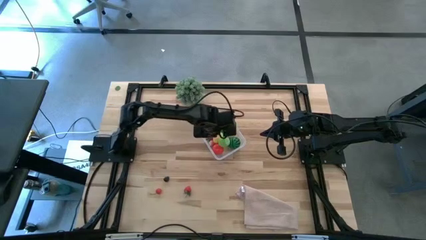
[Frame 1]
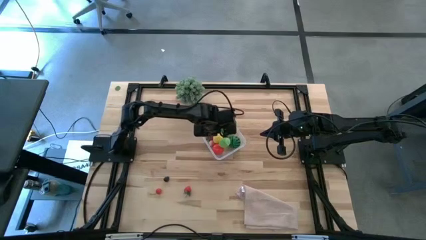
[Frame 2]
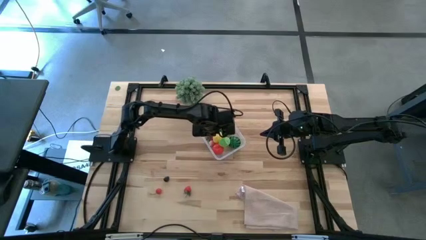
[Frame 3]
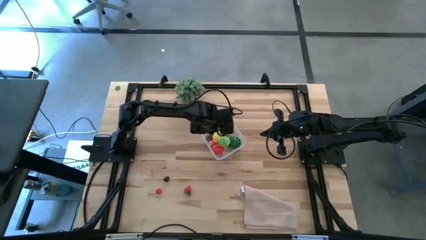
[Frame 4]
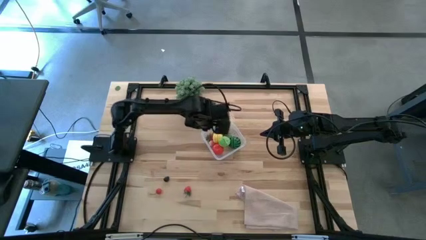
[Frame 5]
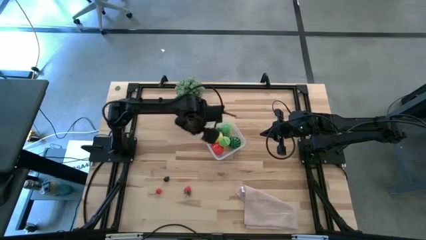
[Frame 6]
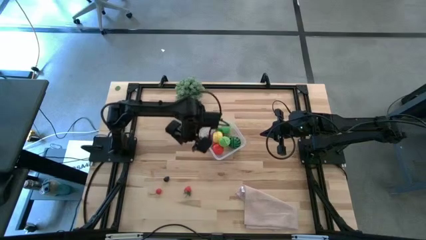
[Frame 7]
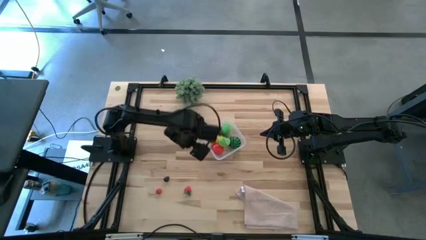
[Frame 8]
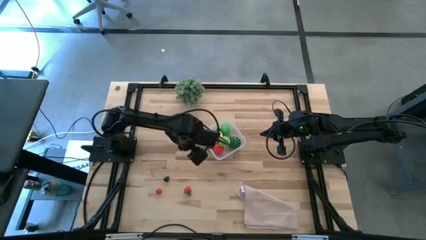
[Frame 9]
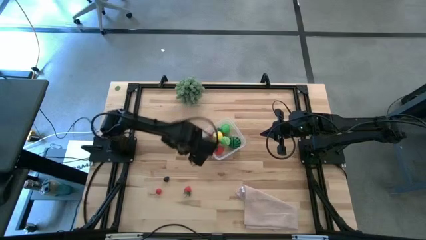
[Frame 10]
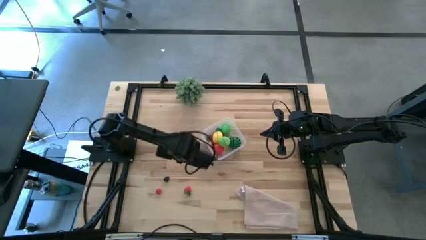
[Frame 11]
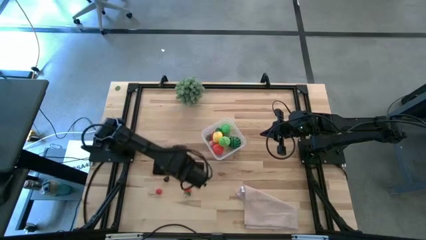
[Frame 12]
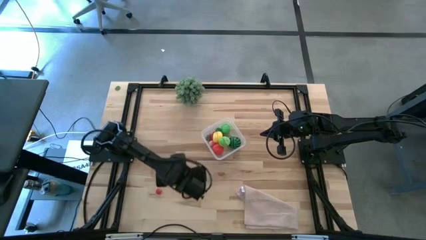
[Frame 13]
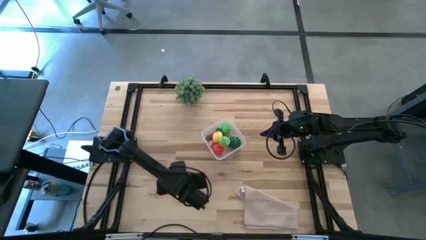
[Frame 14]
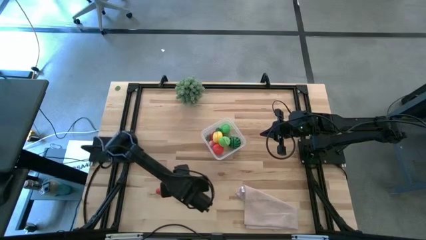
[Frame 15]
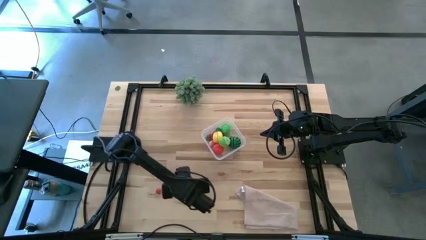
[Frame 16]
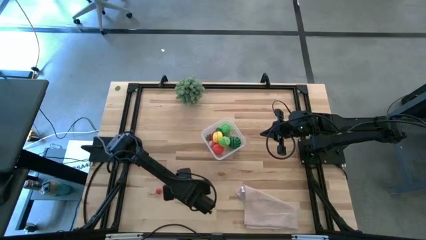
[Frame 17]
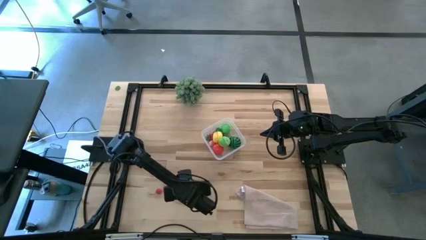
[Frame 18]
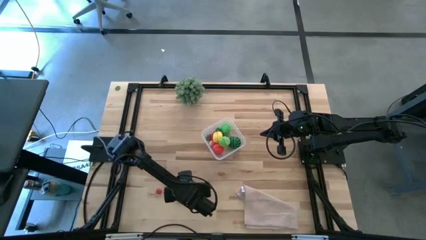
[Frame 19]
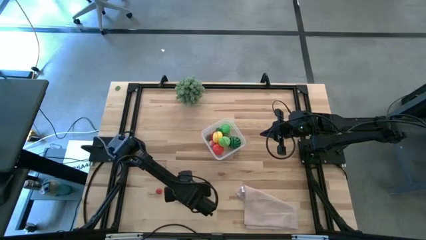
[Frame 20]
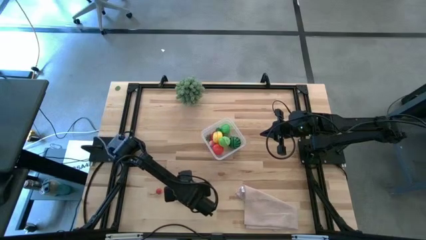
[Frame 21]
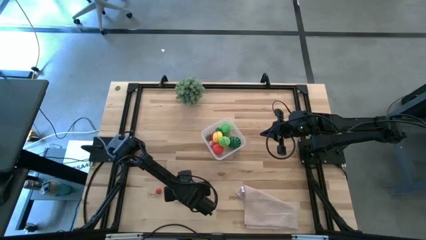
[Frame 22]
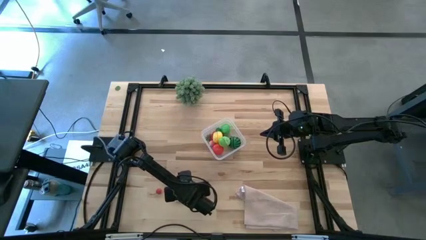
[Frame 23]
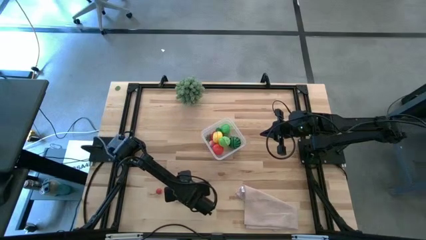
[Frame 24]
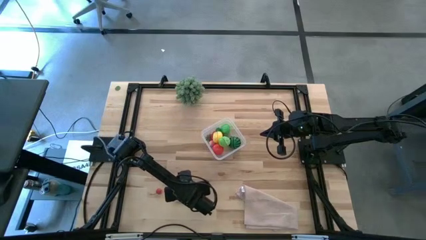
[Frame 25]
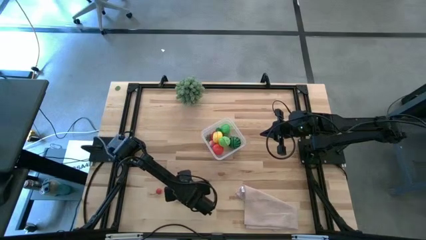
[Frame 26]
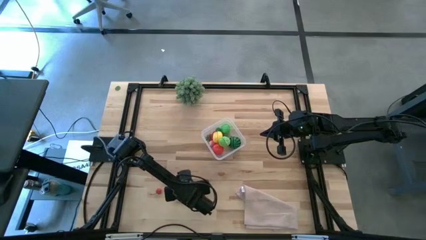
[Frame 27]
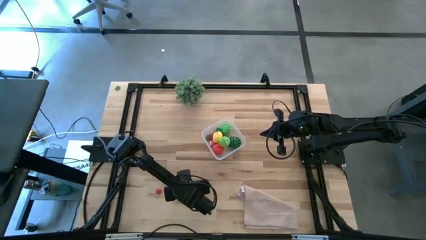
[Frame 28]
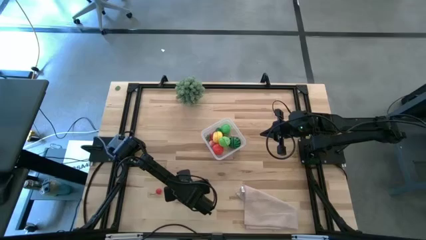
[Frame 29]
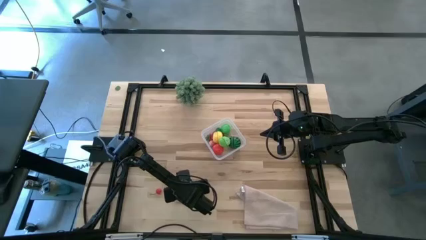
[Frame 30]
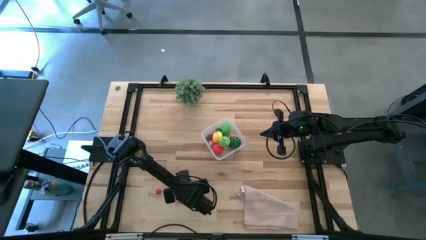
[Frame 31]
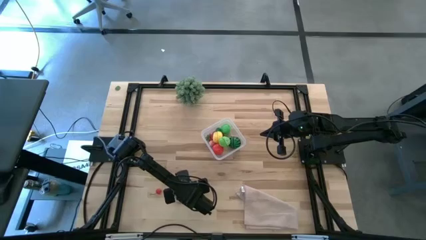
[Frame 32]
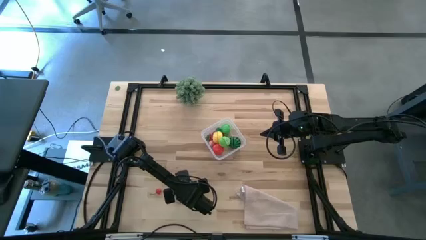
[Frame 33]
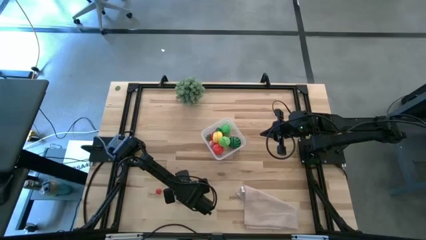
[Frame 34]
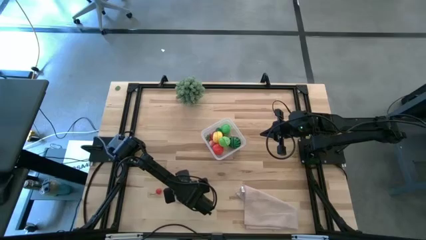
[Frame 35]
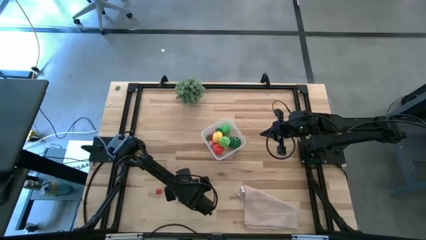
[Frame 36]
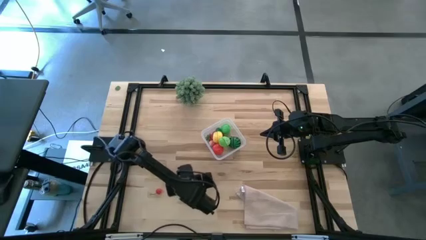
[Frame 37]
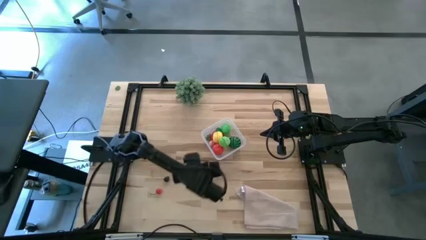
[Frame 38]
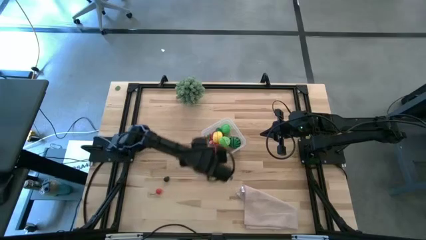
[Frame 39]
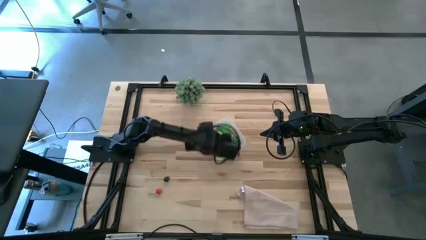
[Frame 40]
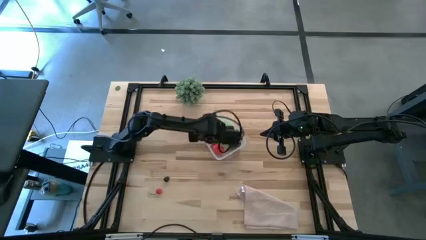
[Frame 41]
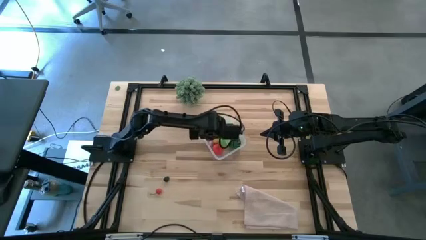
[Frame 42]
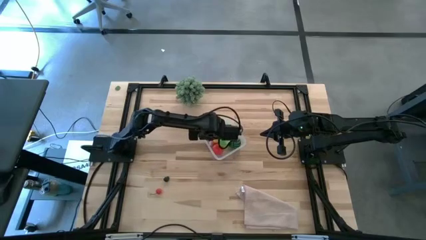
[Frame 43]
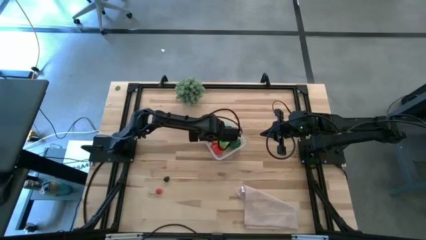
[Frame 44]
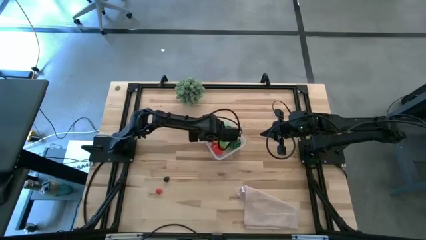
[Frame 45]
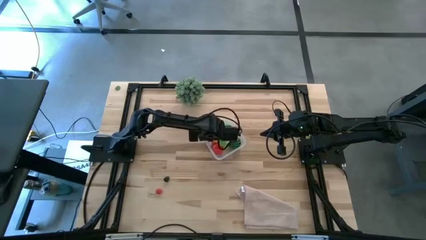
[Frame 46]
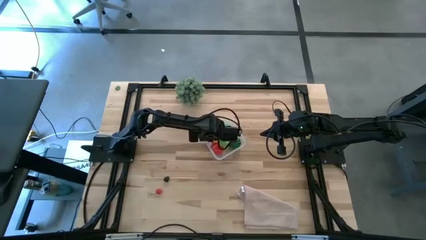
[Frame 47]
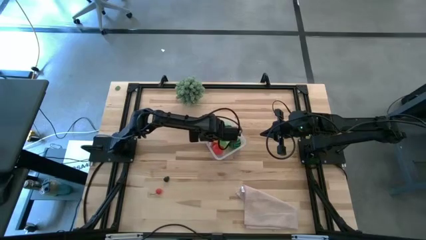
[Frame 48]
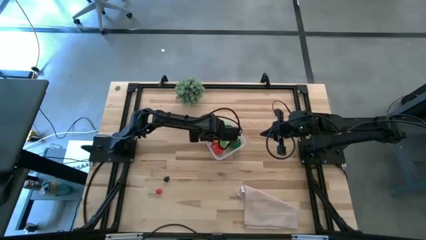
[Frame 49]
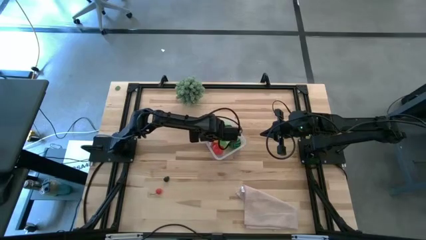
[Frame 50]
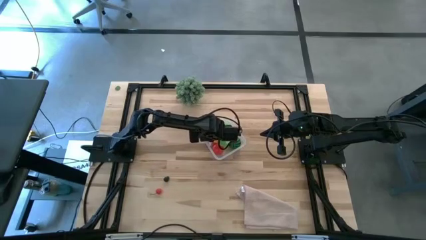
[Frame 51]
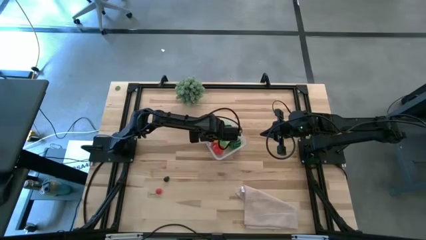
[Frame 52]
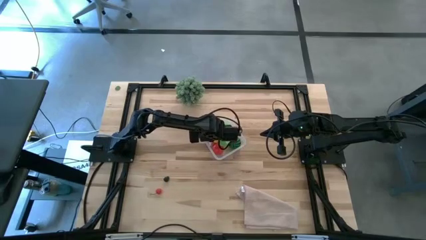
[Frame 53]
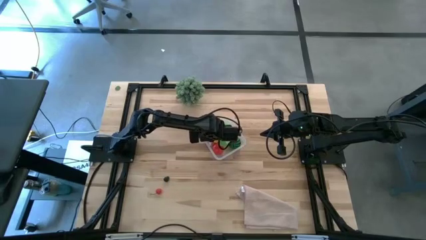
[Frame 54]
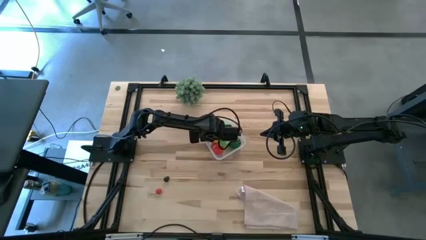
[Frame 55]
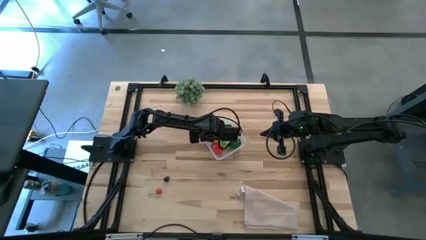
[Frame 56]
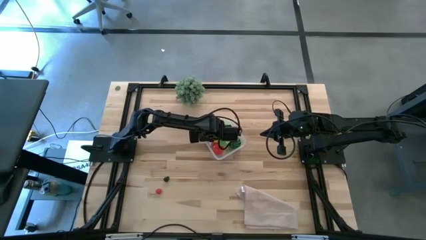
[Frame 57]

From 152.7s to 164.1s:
Task: Pick and placing Produce into tupperware
Put the red strawberry into the transparent bin

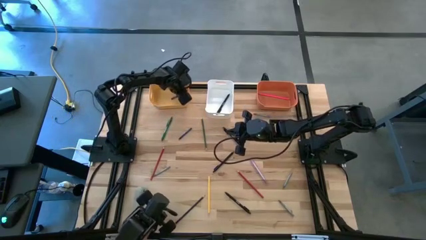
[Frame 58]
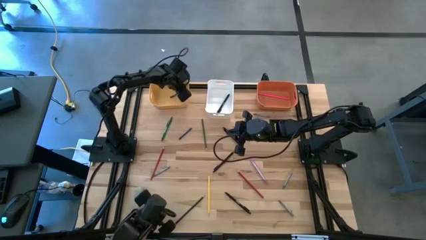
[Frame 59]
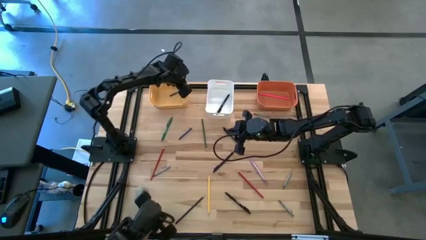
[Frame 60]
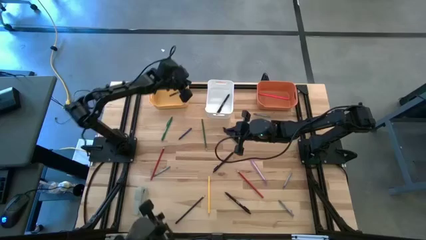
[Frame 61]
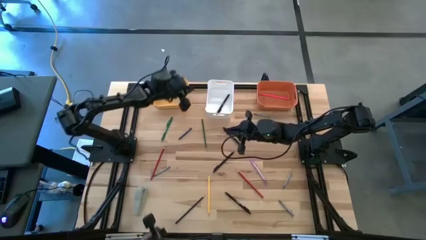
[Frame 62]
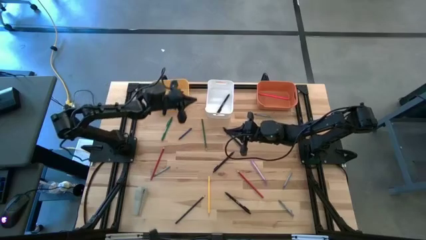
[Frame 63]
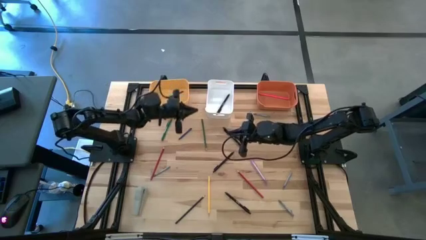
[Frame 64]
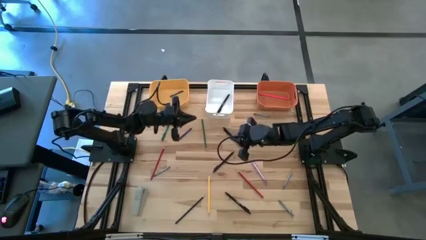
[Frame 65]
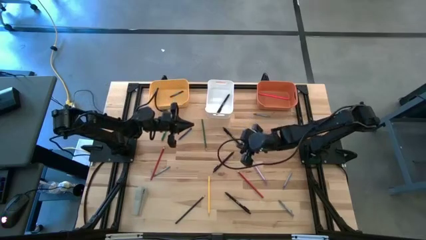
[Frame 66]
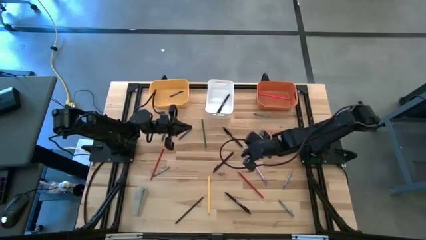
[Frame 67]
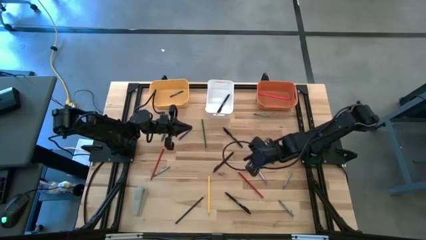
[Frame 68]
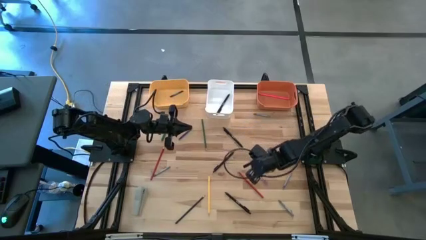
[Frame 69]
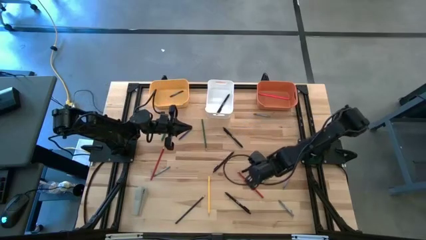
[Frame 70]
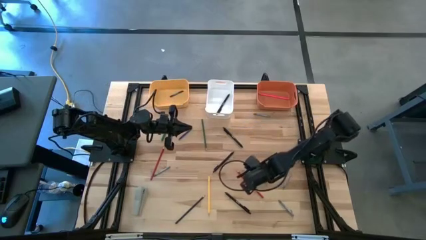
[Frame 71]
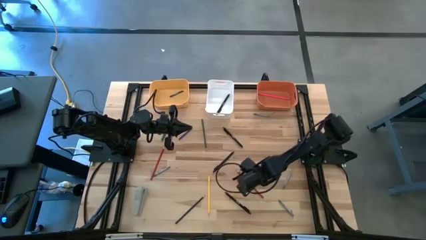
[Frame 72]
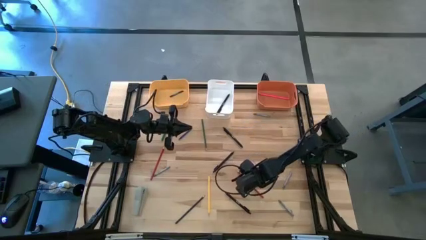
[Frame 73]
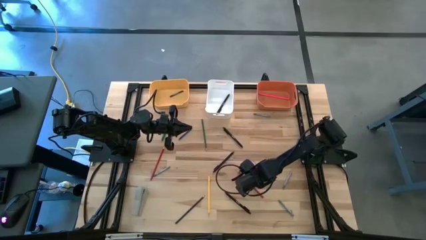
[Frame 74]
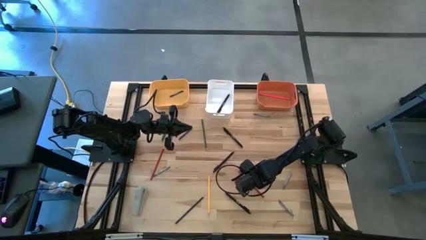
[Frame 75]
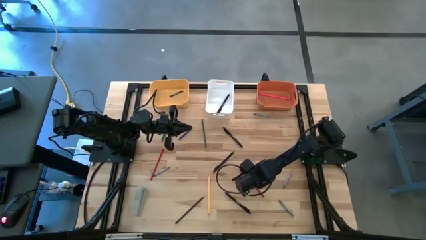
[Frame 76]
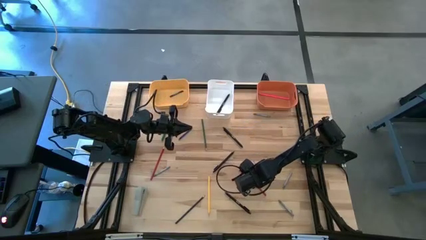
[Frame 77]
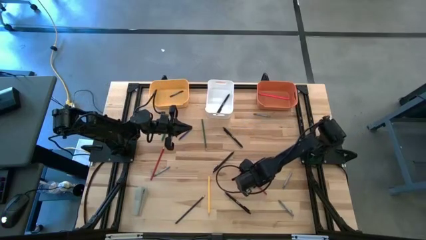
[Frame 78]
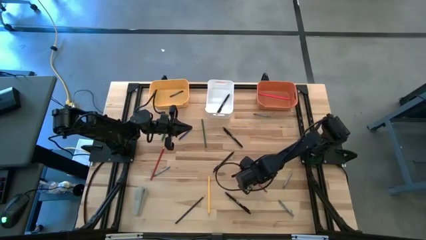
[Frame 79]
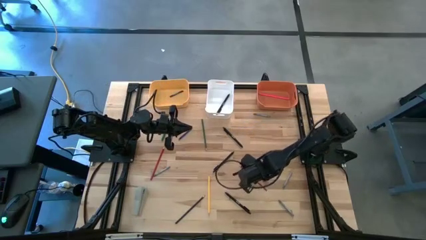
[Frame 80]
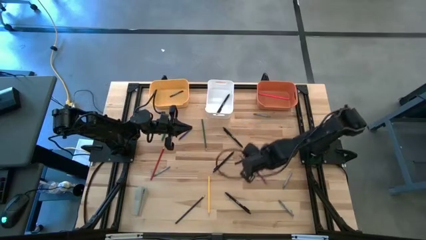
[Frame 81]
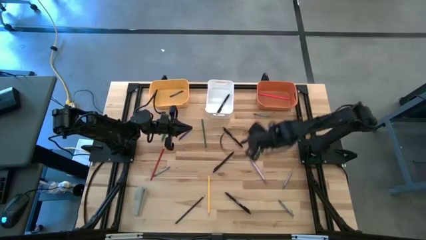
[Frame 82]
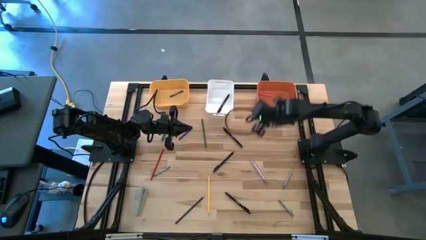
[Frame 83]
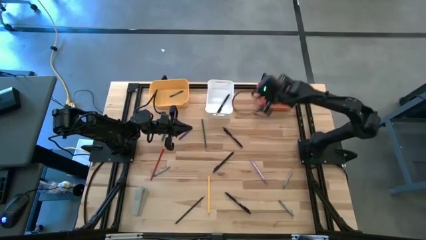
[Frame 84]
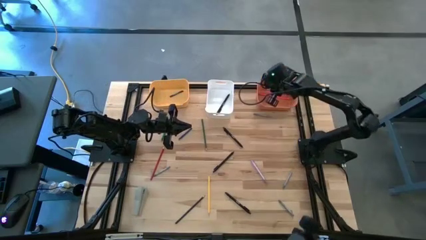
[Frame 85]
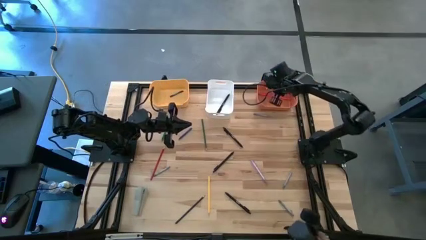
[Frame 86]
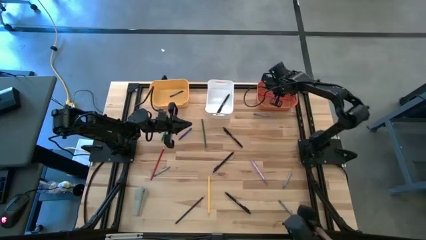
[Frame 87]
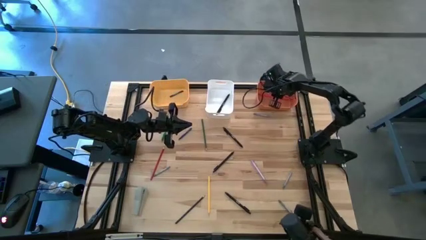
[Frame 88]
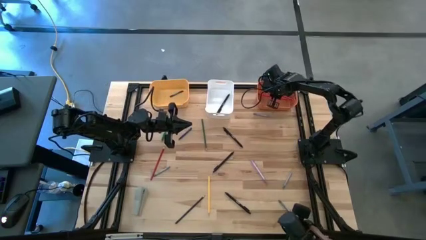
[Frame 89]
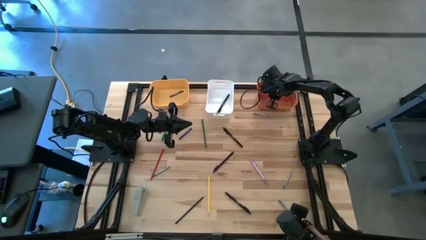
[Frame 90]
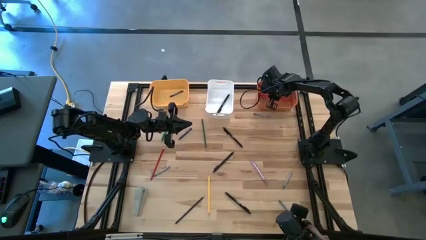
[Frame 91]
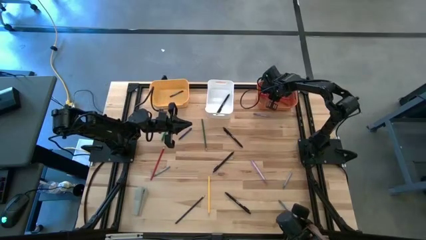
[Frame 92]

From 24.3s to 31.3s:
Task: Sort crayons/erasers/pens/pencils in bins
Put the red pencil into the orange bin
